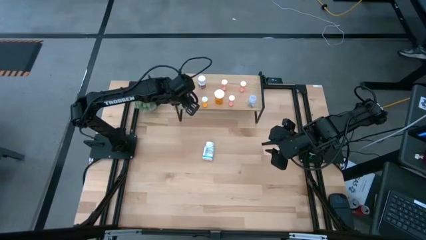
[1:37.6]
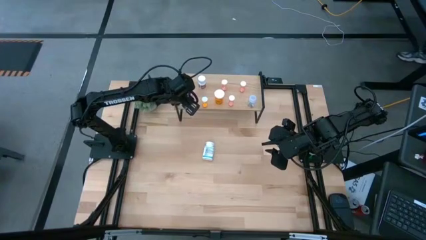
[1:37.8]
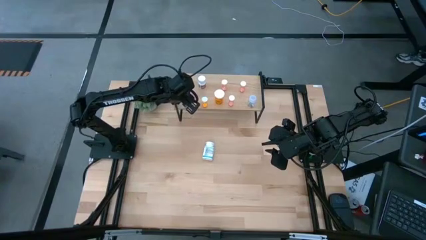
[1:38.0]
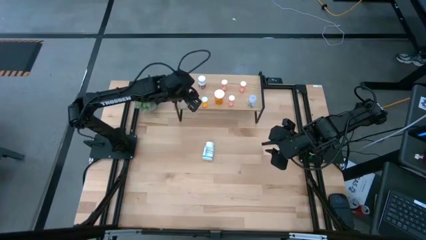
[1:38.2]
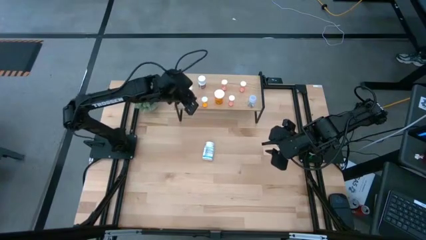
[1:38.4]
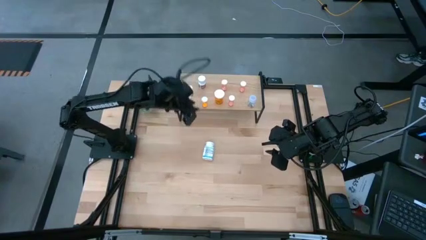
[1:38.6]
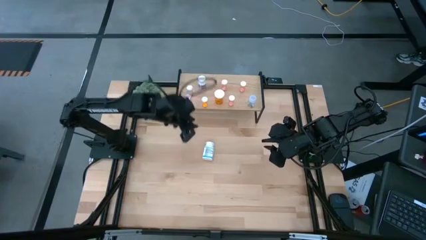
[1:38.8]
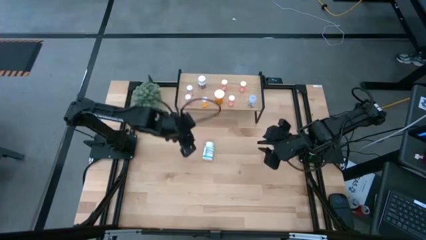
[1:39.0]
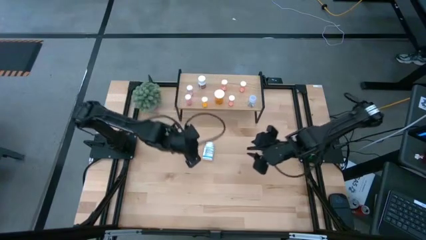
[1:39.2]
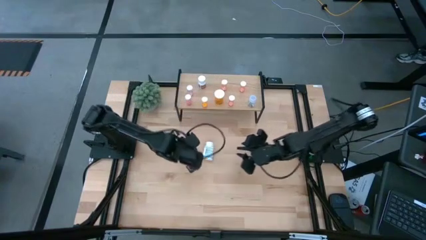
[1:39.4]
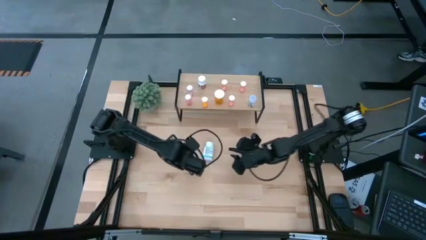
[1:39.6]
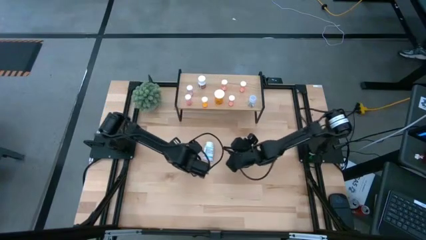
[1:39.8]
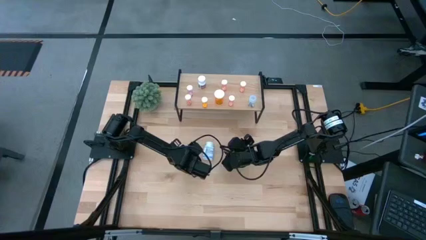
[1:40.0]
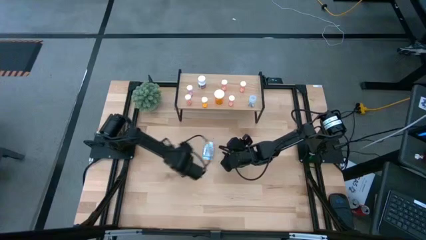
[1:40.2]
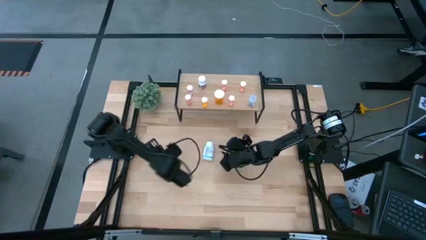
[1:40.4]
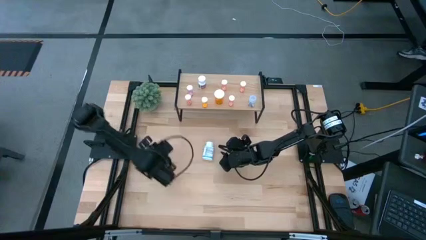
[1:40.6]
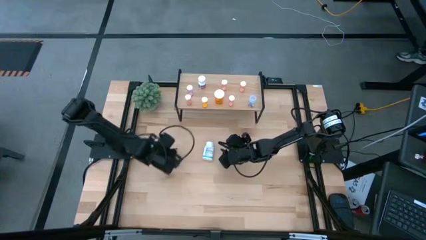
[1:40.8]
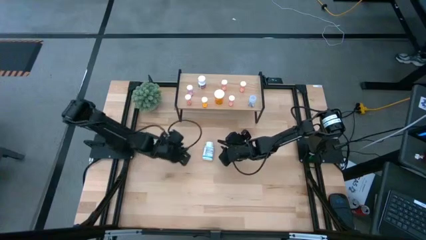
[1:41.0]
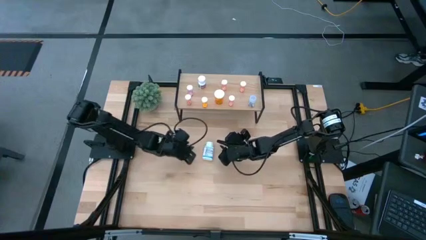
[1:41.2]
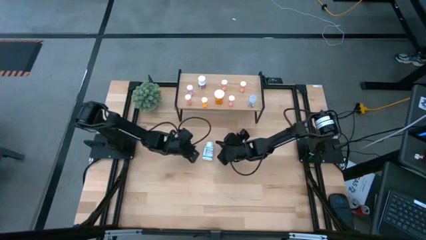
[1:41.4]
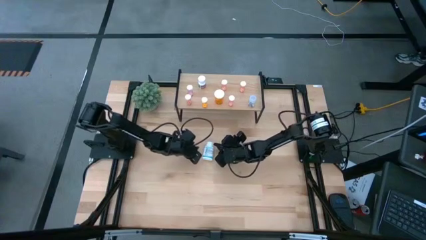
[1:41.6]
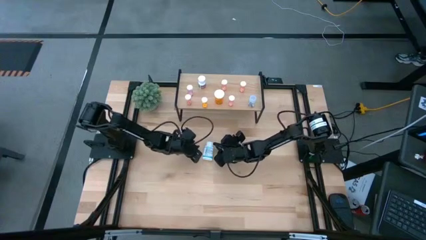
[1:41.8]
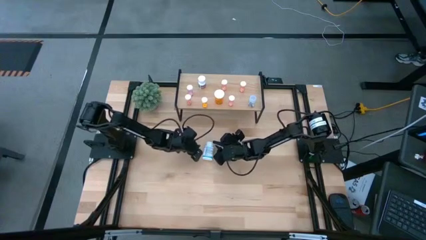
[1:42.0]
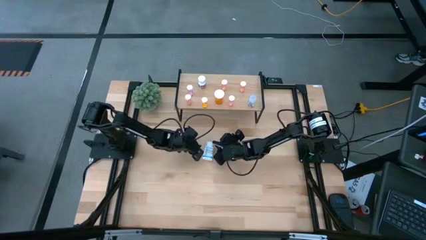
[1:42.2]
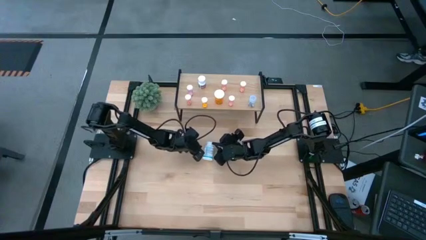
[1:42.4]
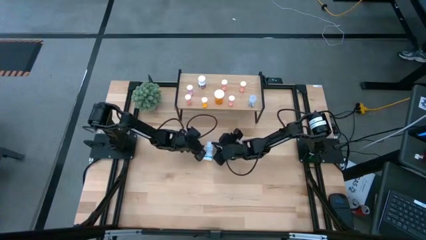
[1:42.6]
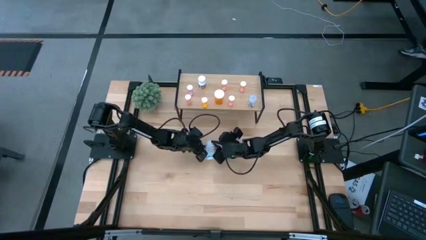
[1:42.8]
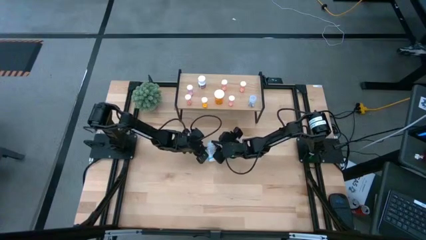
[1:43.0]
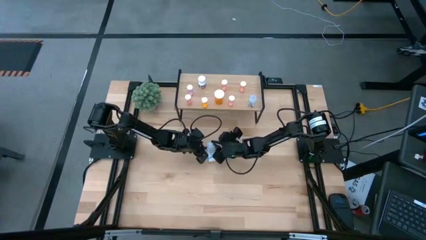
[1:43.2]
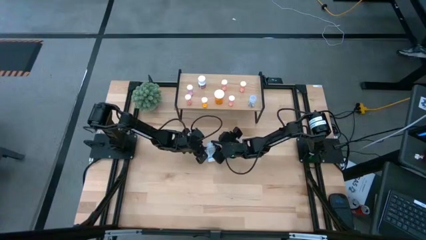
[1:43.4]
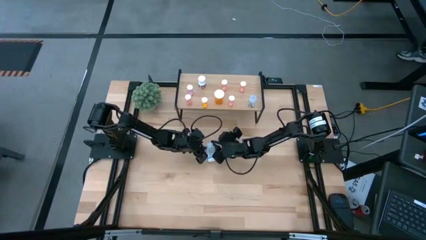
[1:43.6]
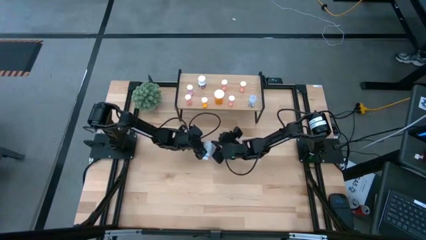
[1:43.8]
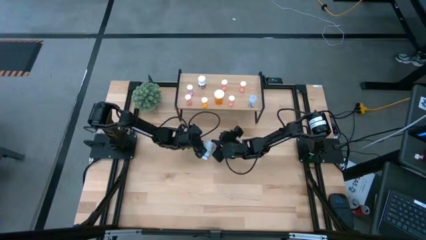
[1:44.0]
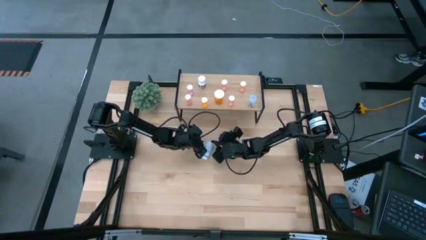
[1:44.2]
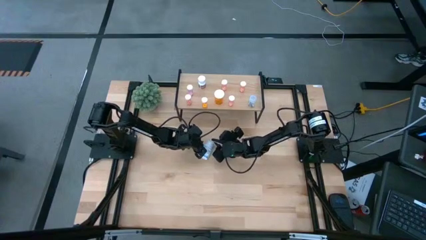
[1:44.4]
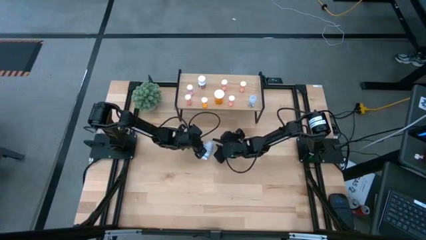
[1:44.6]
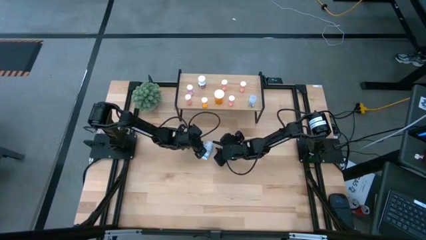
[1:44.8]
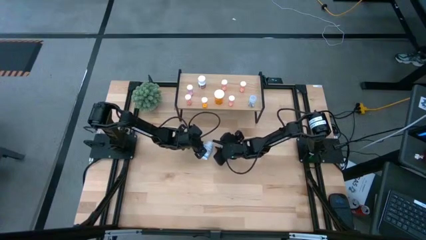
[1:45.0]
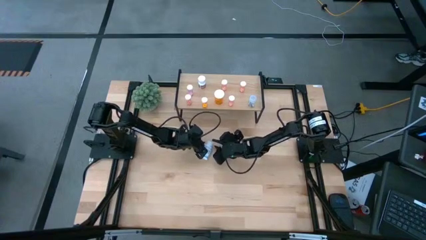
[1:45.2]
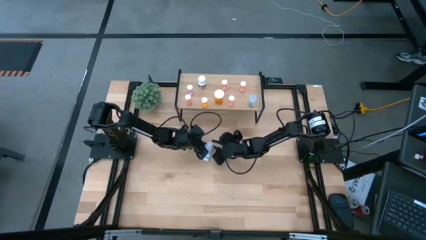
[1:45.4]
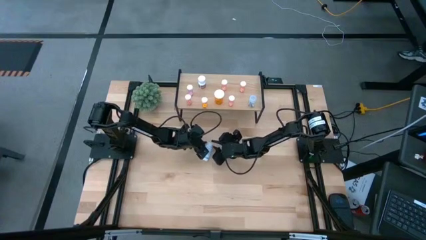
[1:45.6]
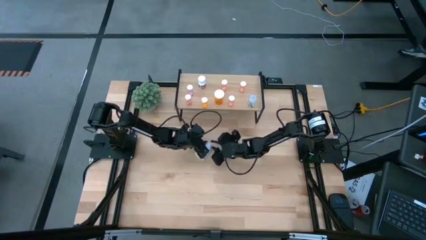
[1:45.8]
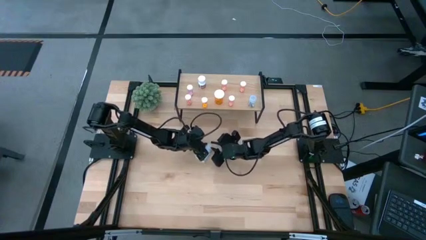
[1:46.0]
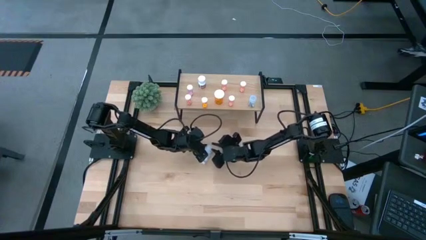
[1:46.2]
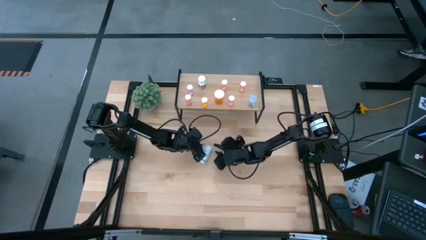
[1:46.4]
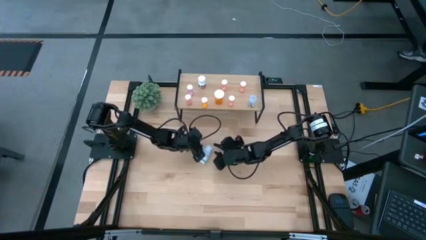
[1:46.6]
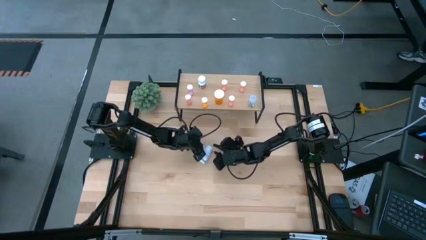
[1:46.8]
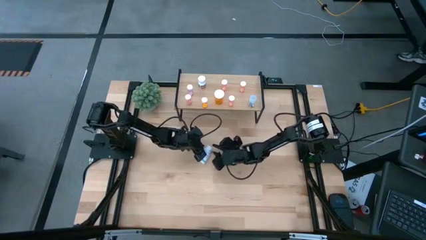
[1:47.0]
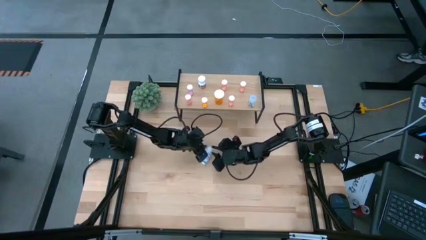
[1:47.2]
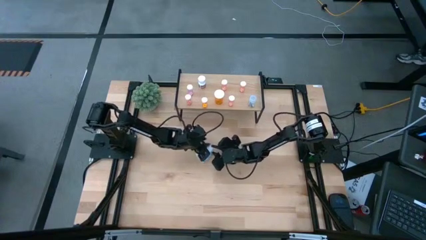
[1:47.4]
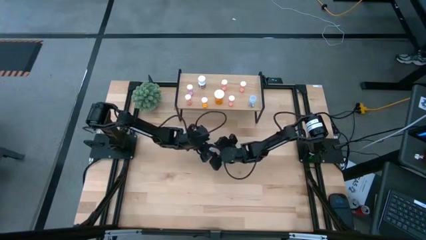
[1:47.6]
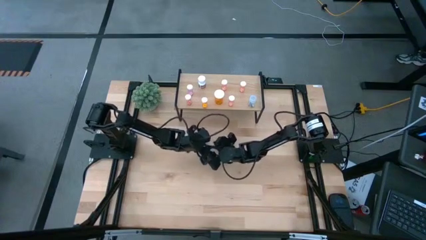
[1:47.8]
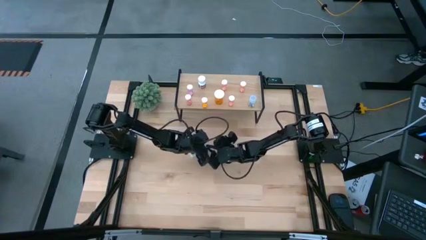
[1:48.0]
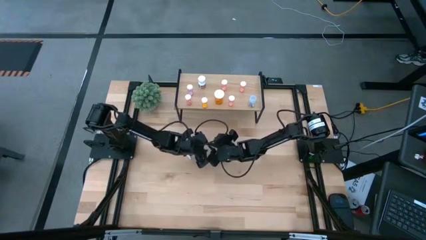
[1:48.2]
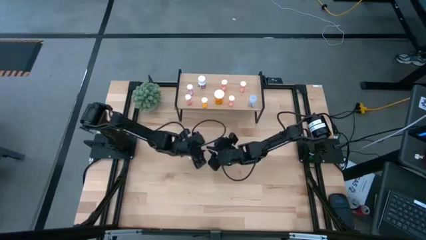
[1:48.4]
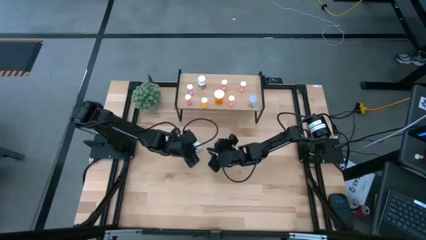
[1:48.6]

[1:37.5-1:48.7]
Task: Pick and place medicine bottles onto shelf by color
Put the white medicine bottle on the shelf

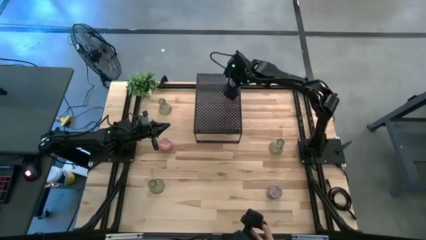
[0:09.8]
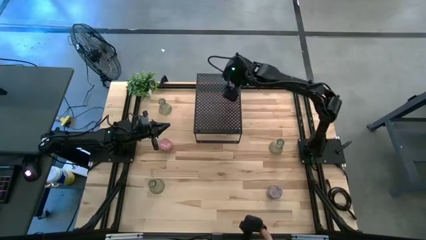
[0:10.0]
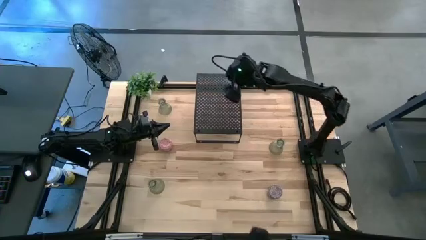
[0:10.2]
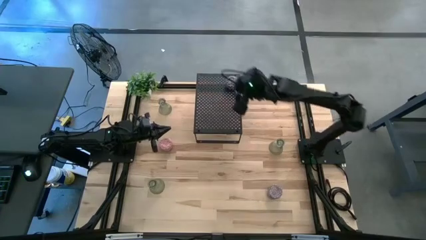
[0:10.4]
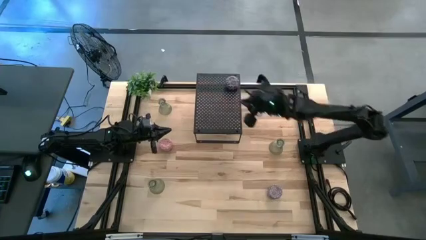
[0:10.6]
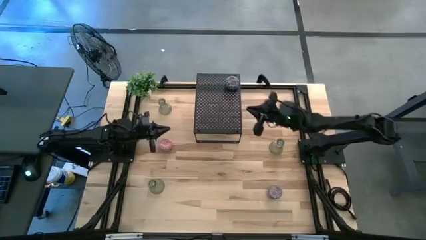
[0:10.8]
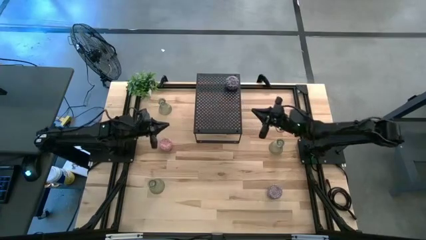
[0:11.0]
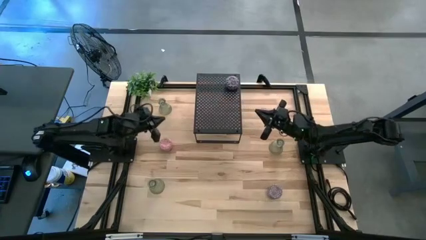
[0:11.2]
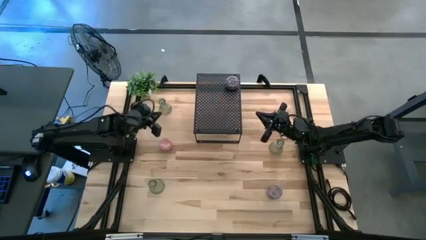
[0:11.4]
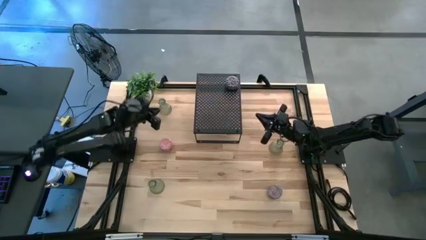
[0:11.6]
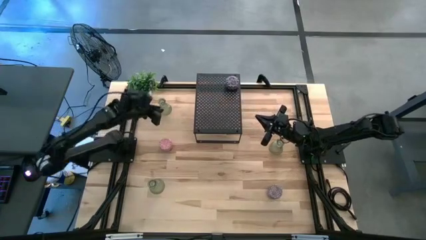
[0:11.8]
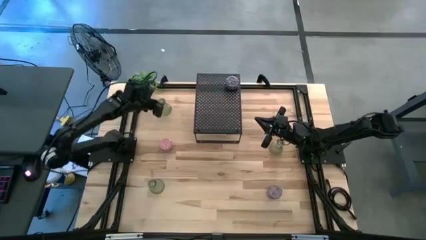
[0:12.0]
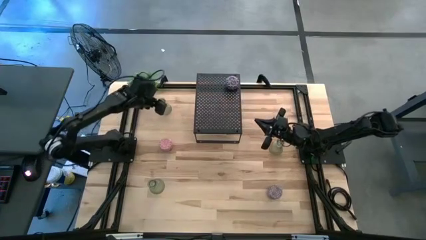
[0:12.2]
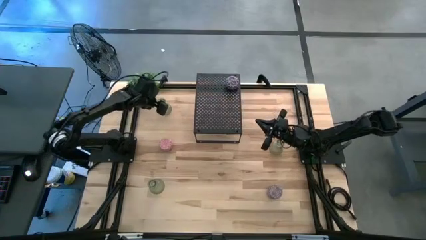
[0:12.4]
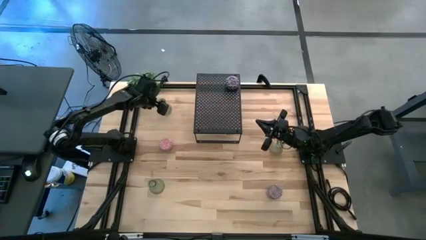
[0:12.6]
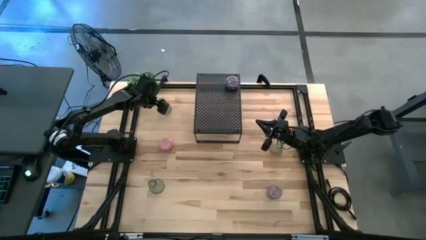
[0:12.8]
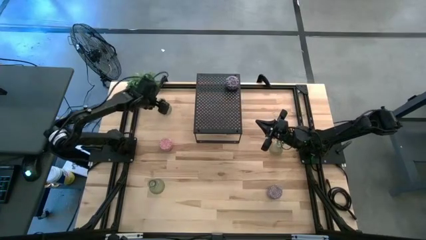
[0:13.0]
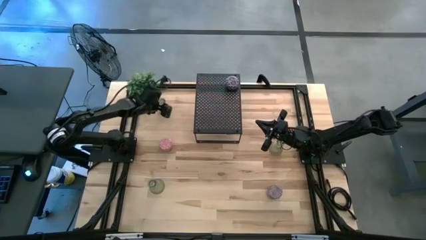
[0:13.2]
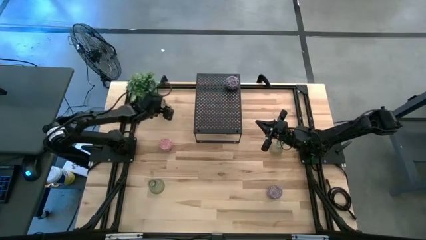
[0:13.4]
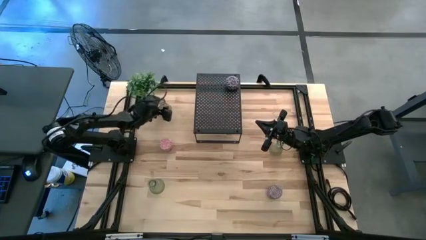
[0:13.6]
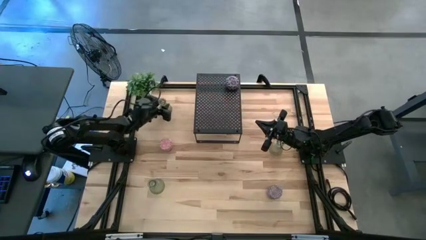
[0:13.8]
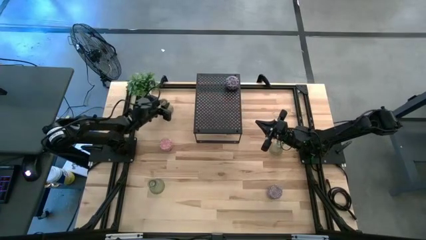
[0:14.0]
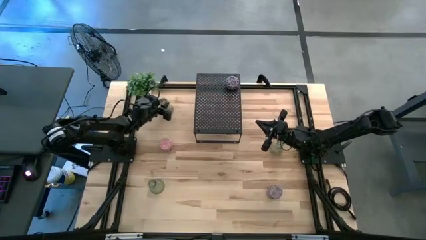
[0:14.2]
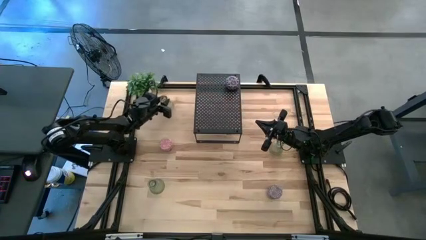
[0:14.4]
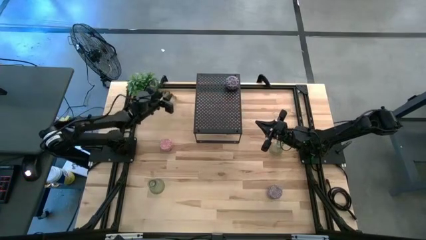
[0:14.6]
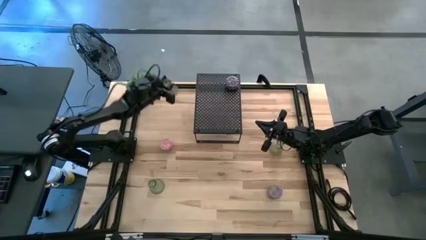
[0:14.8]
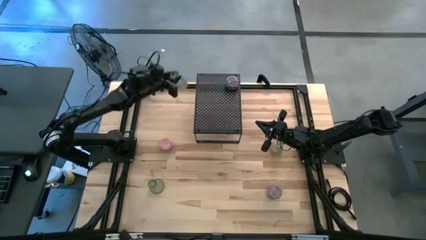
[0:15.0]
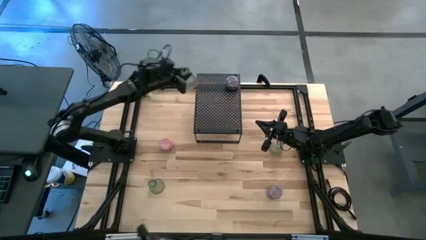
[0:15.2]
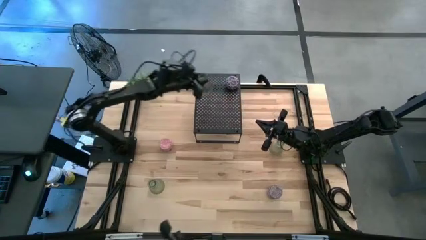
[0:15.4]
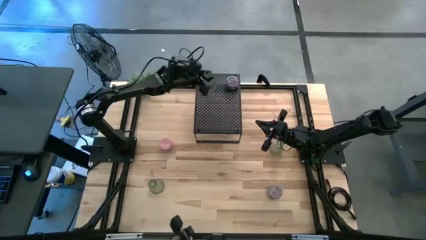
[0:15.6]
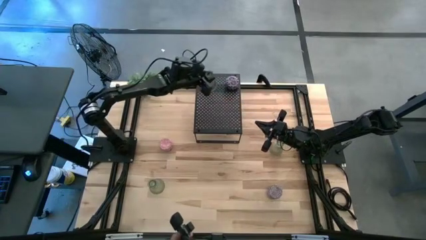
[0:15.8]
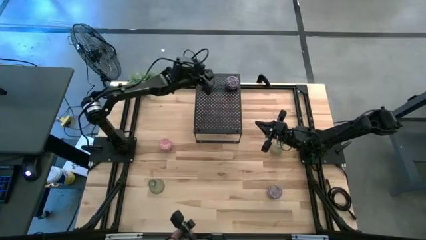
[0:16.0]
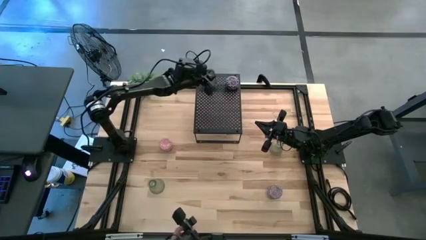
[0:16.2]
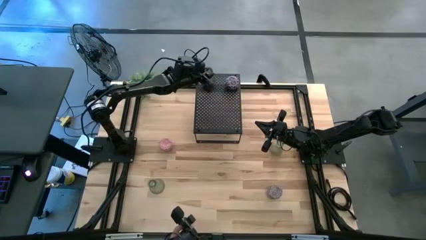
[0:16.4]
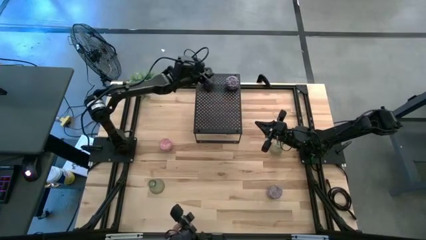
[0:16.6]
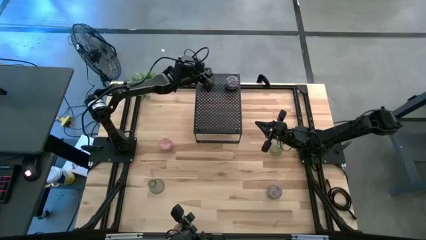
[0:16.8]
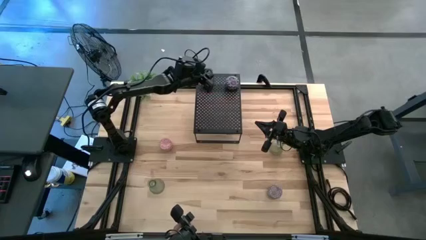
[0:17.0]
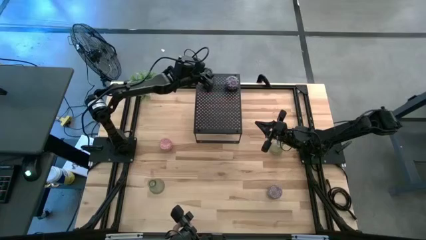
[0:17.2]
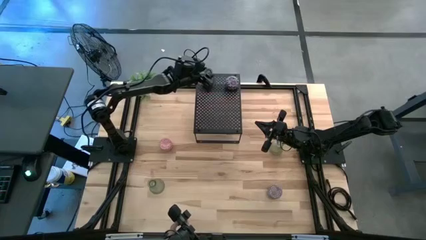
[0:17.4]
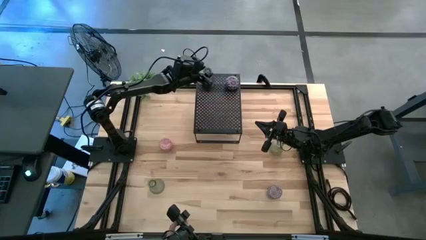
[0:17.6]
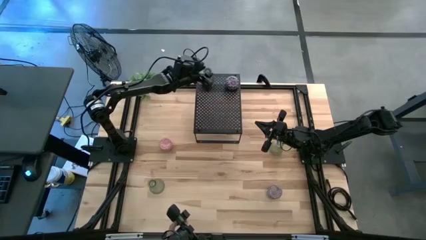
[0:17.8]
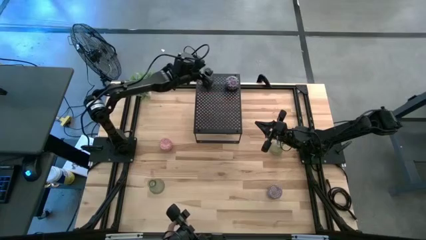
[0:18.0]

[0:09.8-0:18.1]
Task: Stock candles and vases on shelf
Put the top green vase on the shelf
